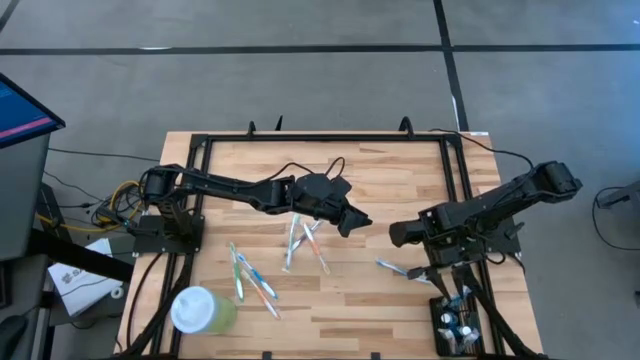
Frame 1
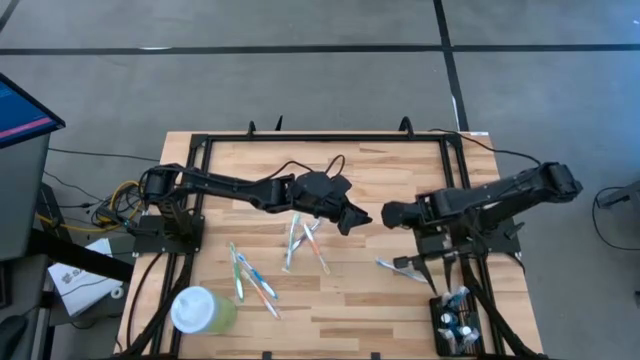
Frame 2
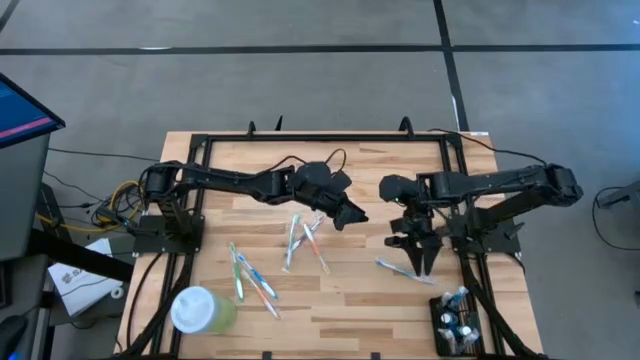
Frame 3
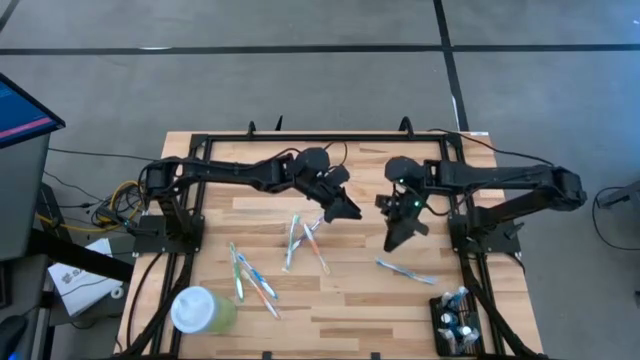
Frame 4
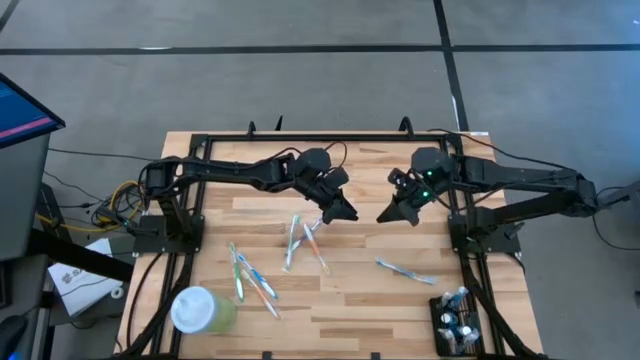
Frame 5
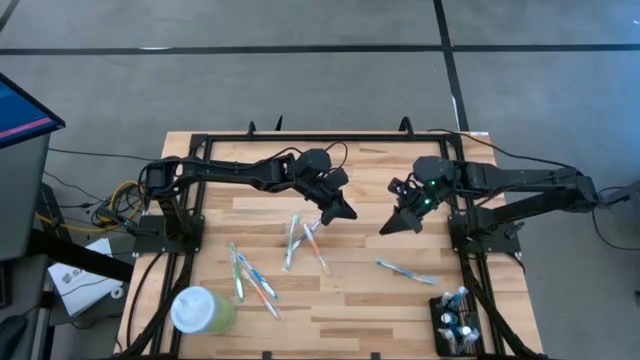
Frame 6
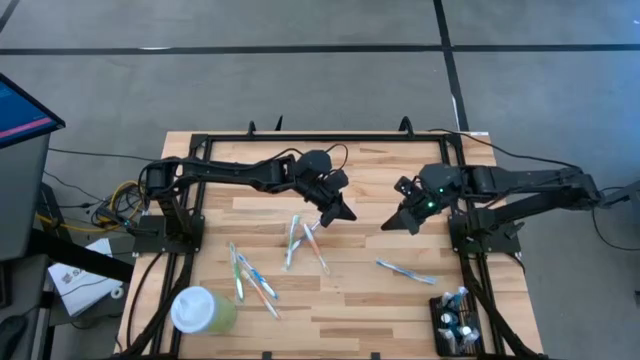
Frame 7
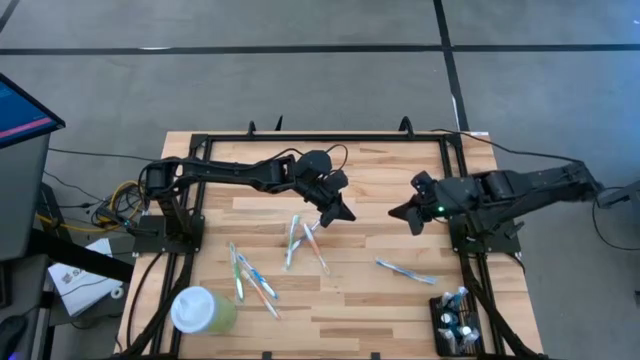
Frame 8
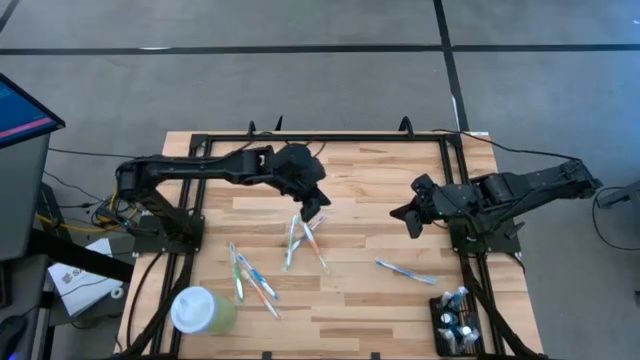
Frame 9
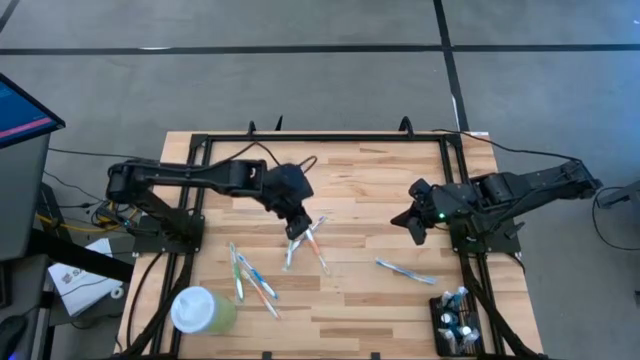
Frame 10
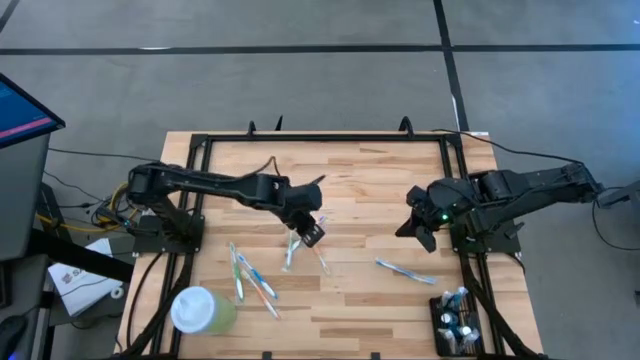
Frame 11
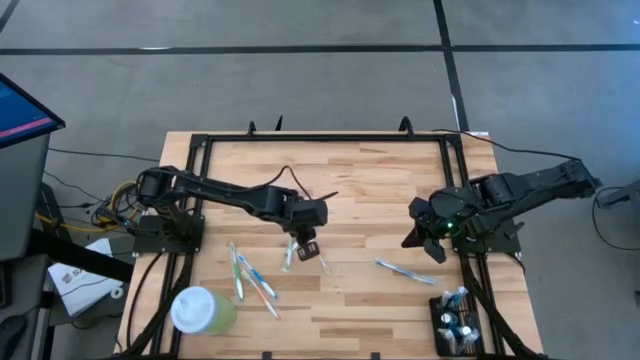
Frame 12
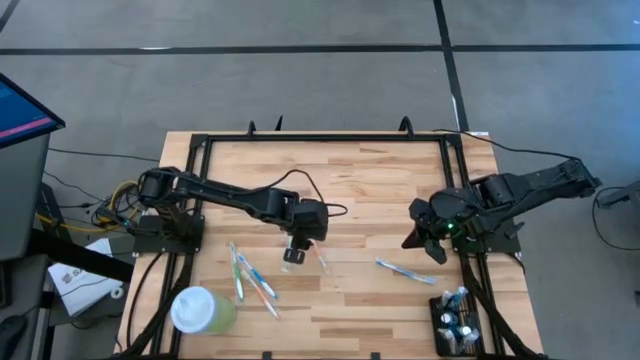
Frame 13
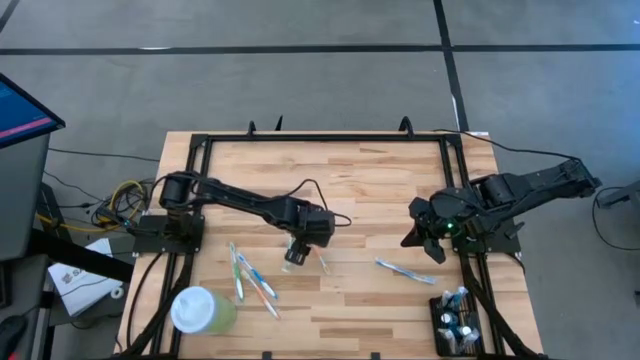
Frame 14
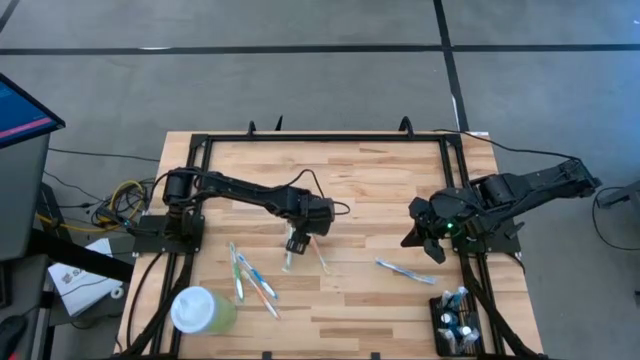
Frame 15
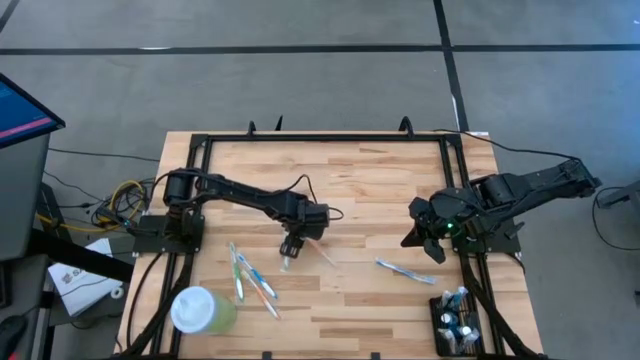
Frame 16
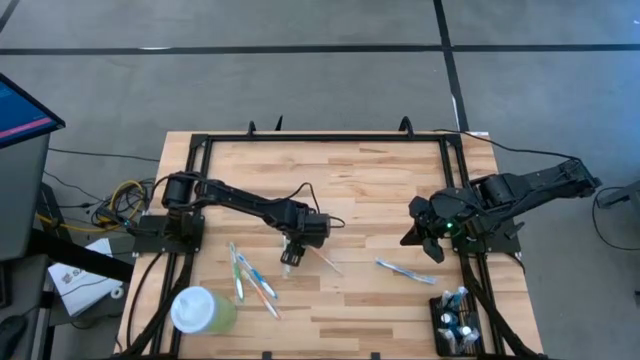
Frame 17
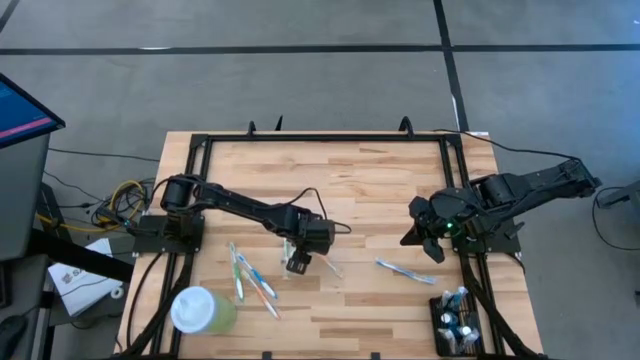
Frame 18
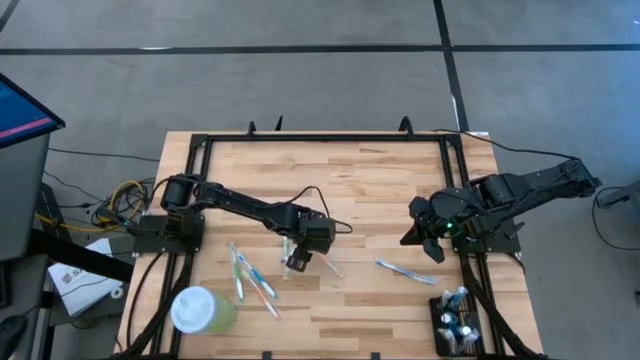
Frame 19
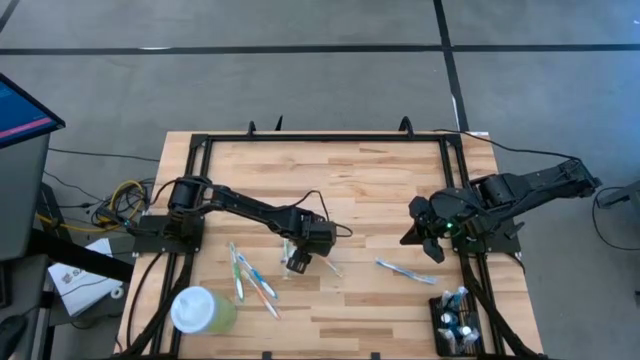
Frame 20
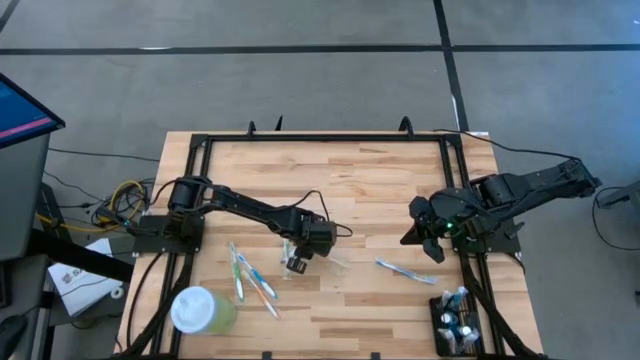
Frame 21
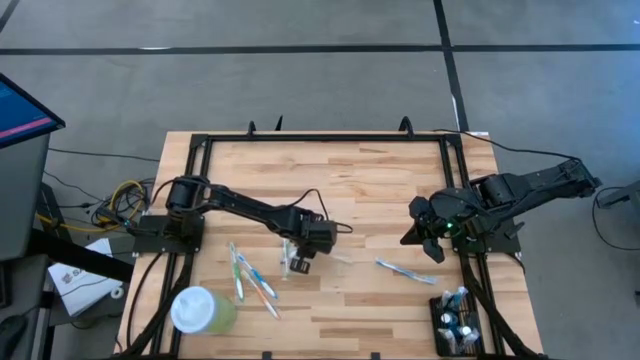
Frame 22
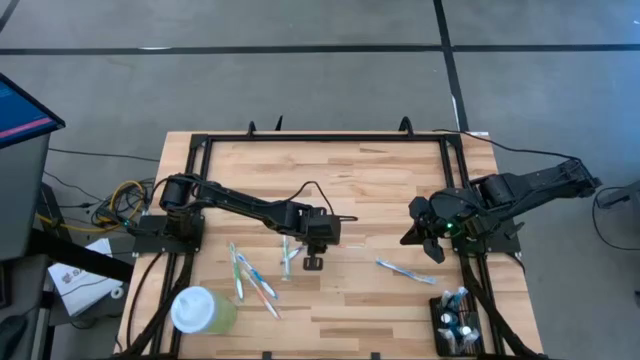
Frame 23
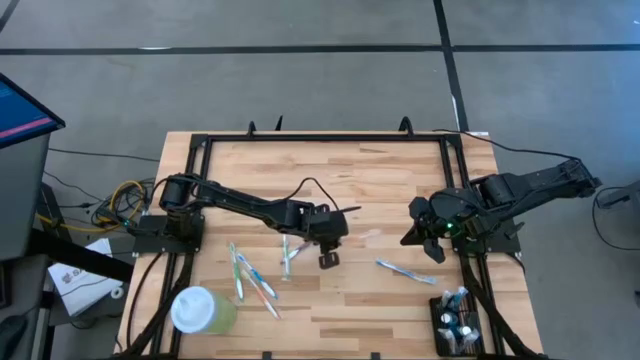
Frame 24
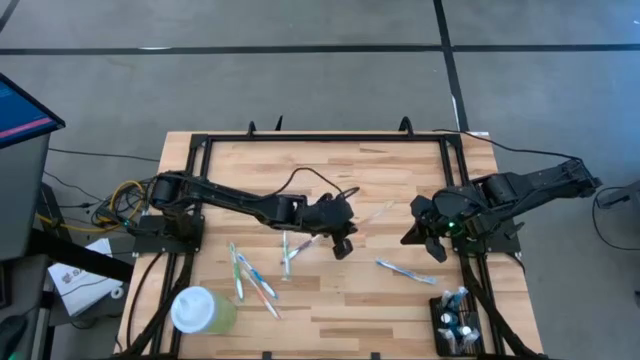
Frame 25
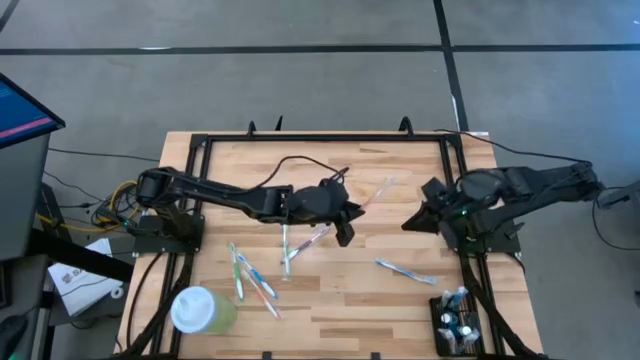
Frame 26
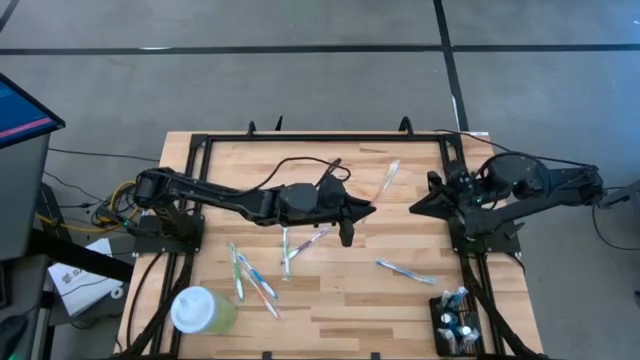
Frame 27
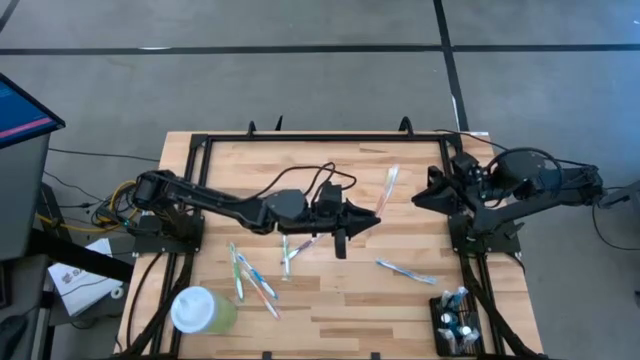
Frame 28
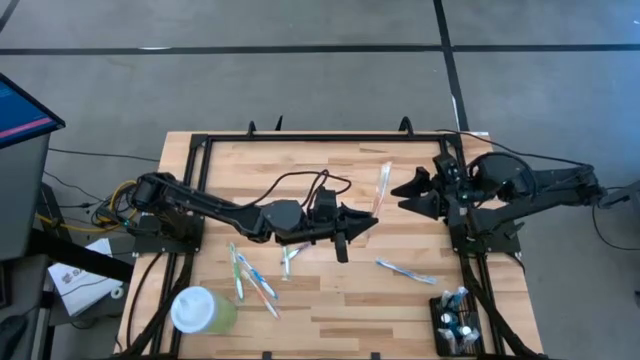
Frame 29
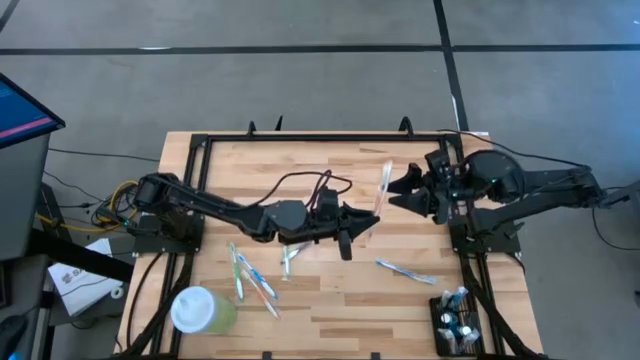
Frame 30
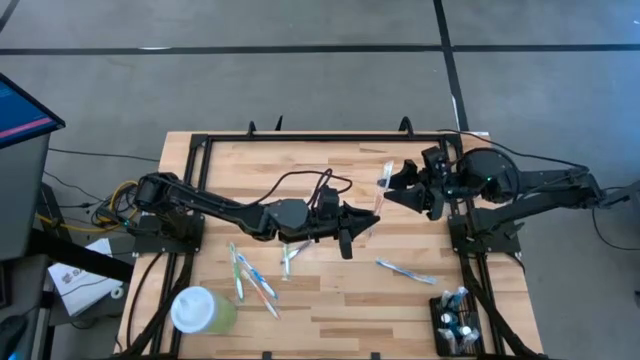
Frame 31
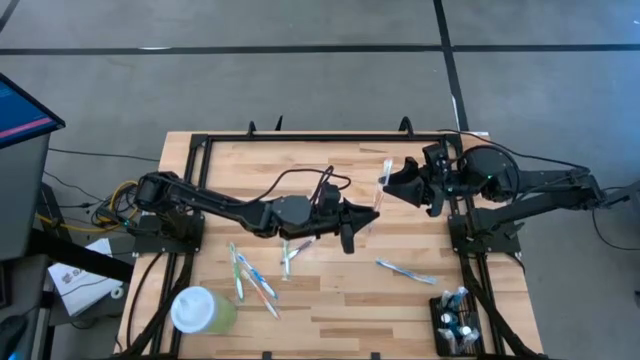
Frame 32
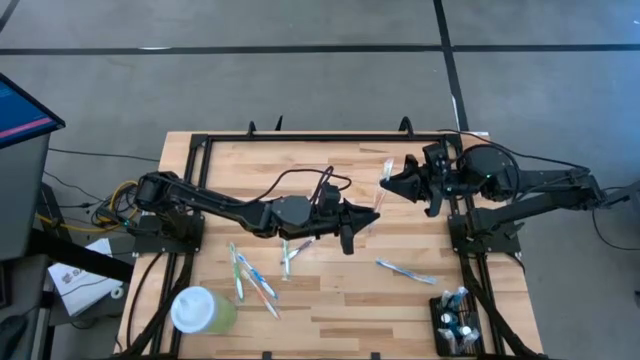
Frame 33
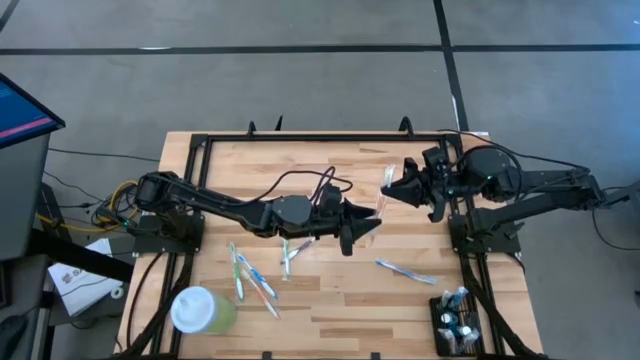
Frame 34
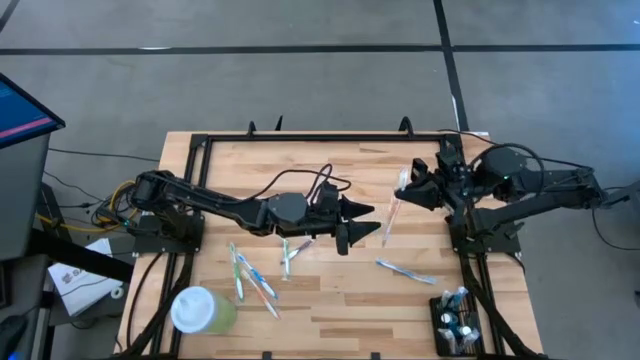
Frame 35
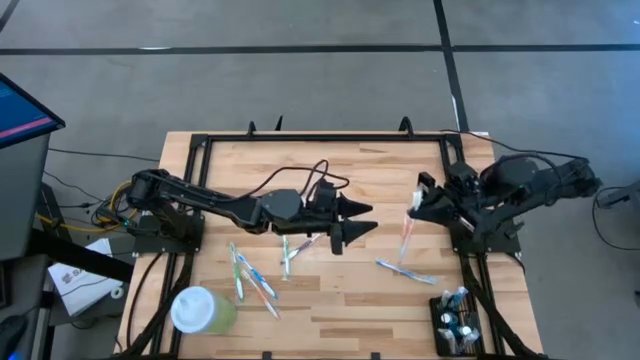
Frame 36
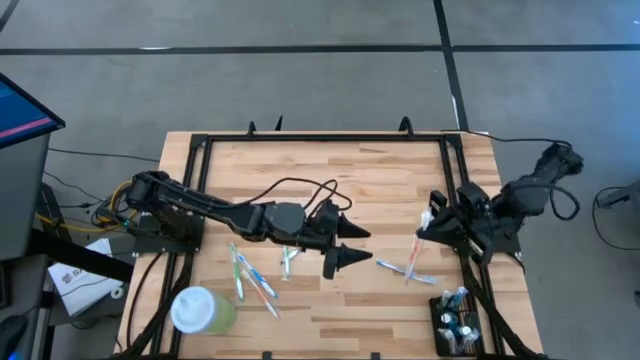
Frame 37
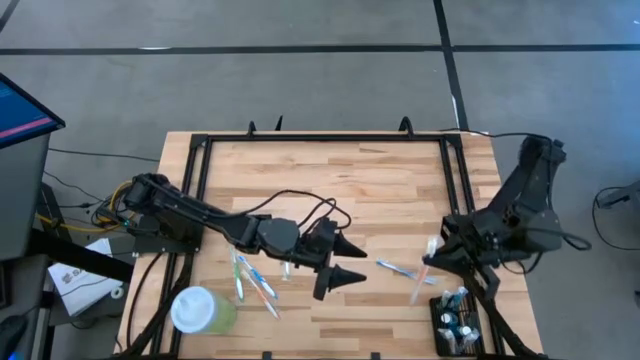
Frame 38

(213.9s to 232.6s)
Task: Pick & Place toothbrushing station
Put the top orange toothbrush into the black organizer

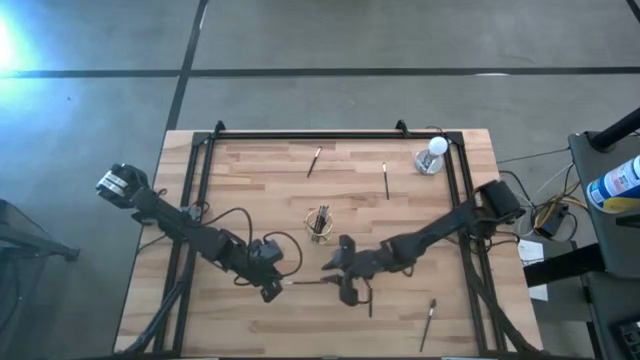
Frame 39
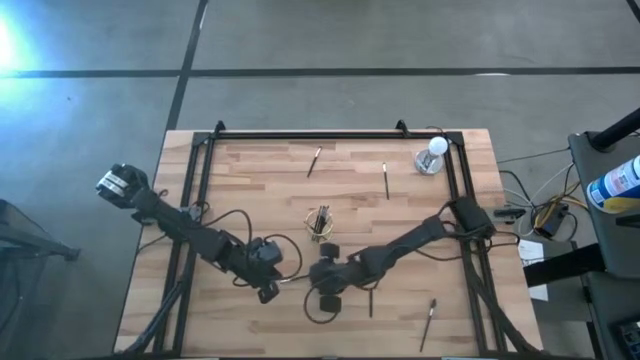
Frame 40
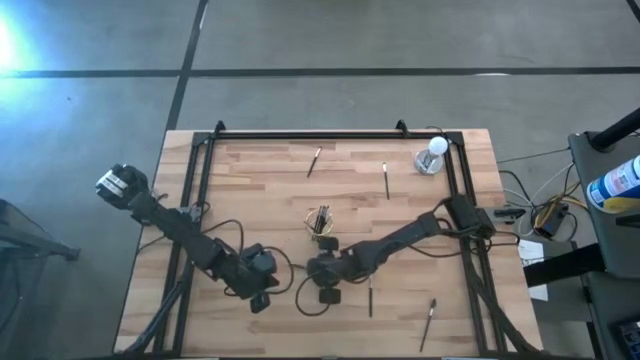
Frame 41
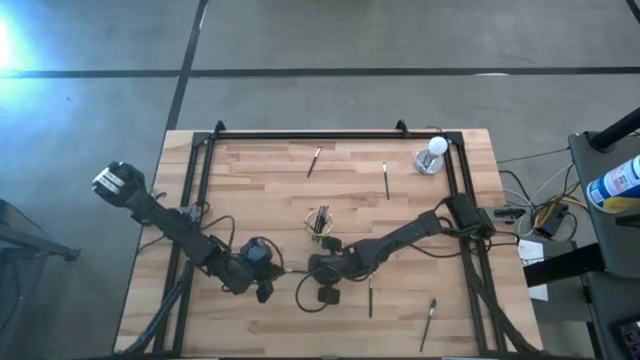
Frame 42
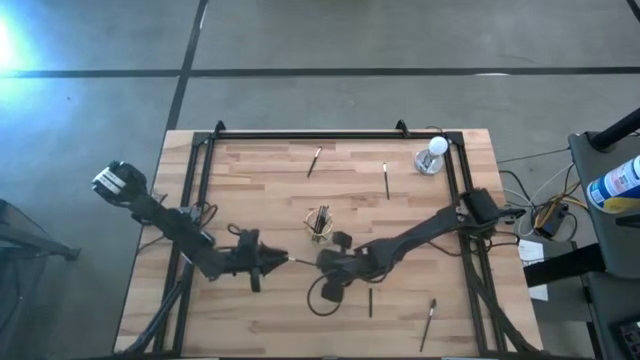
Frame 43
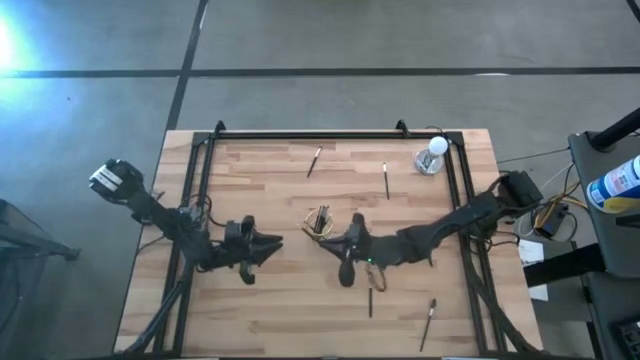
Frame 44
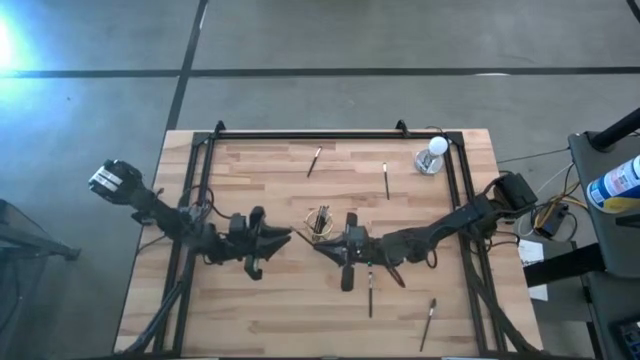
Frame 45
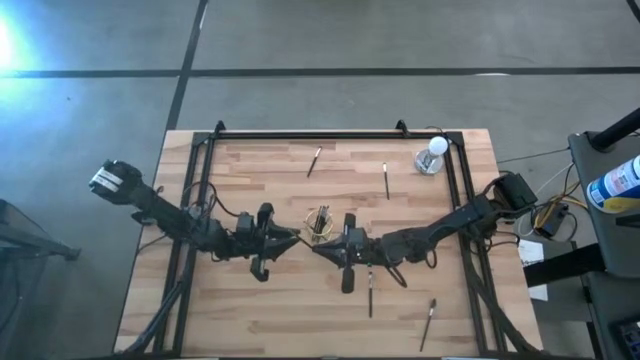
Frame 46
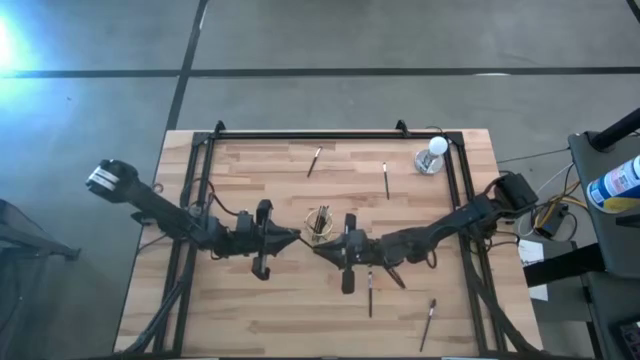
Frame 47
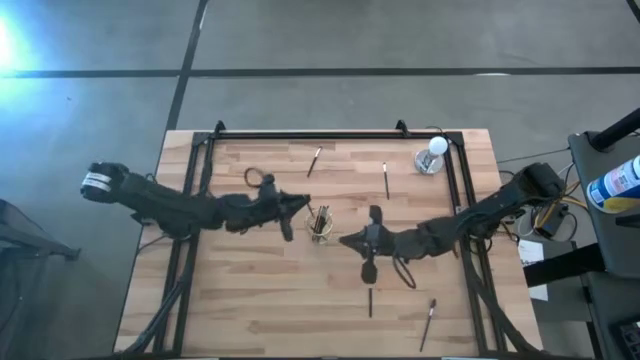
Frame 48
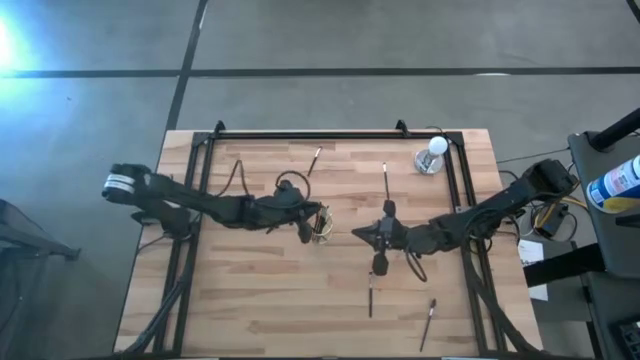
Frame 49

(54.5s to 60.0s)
Task: Pick & Place Makeup Brushes
Put the liner brush into the gold makeup brush holder
